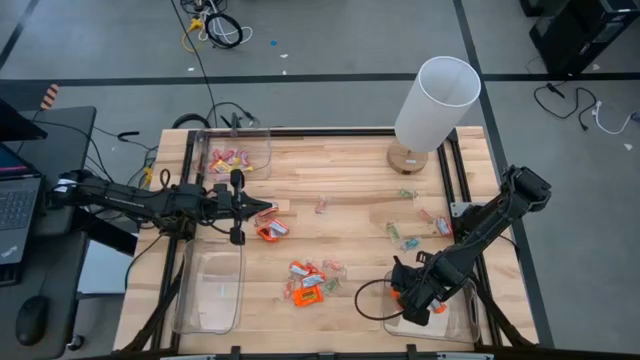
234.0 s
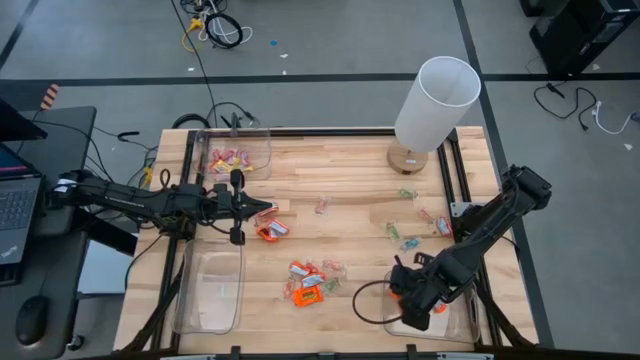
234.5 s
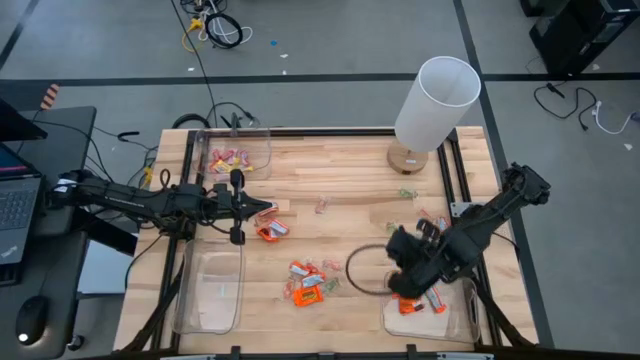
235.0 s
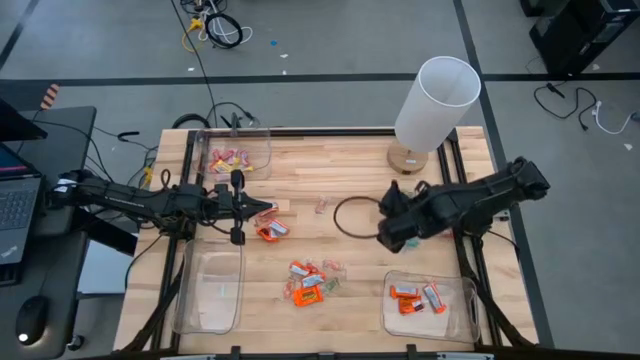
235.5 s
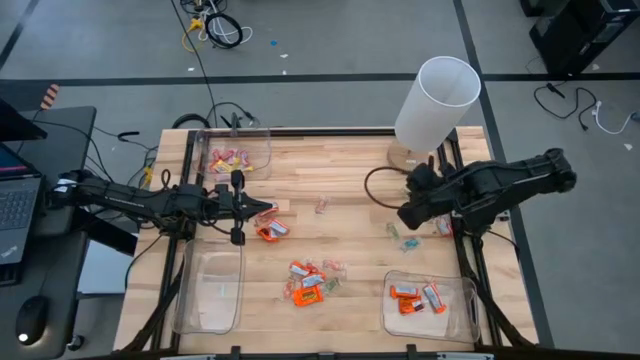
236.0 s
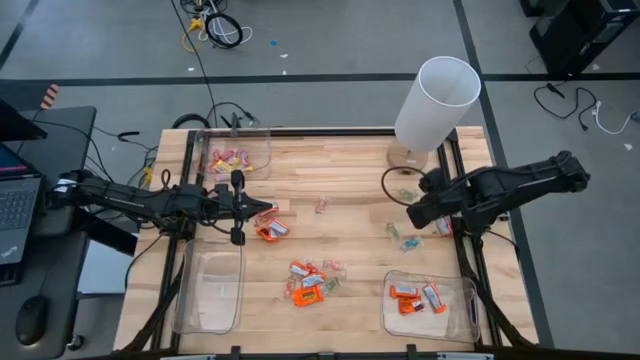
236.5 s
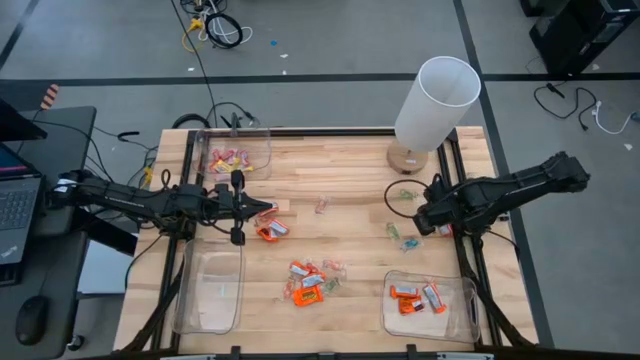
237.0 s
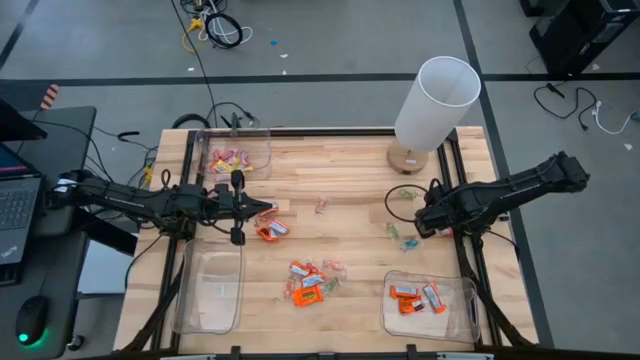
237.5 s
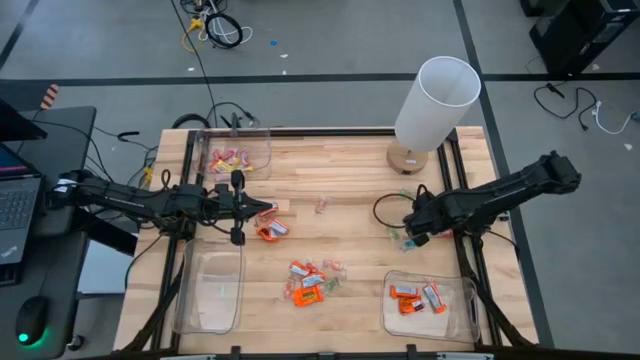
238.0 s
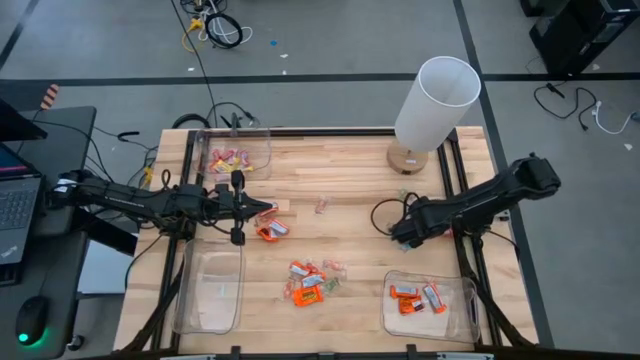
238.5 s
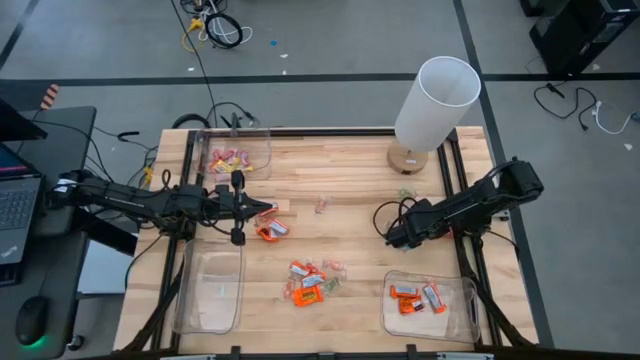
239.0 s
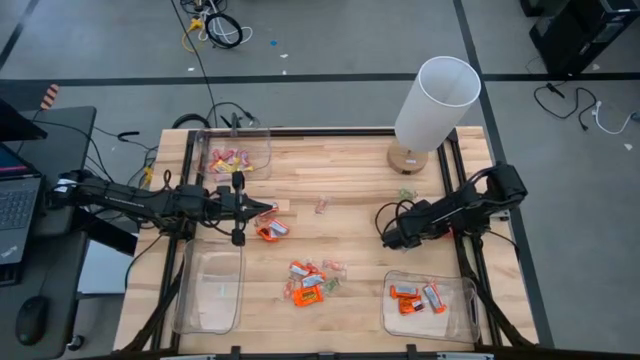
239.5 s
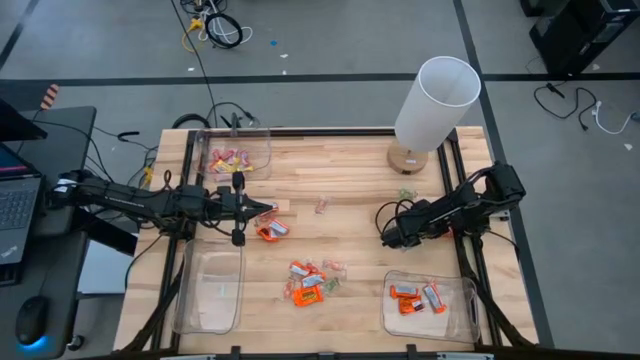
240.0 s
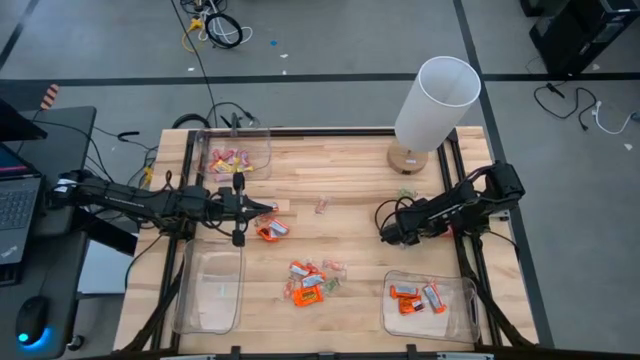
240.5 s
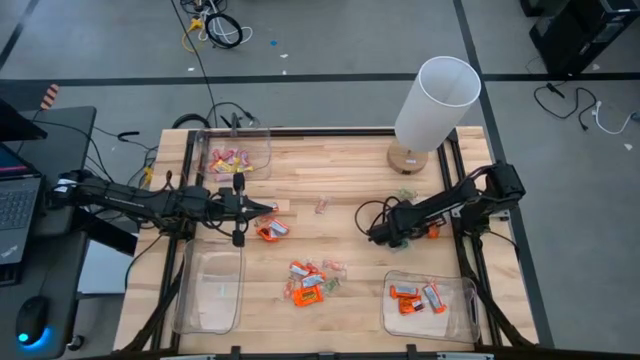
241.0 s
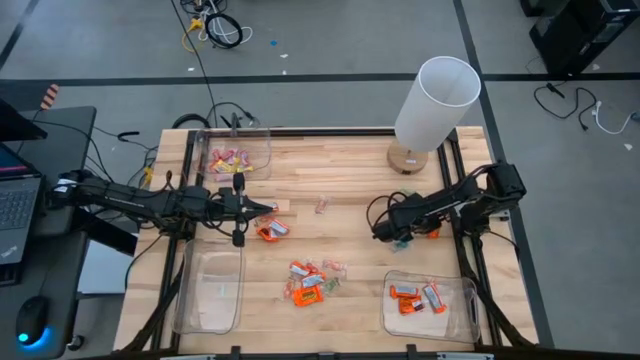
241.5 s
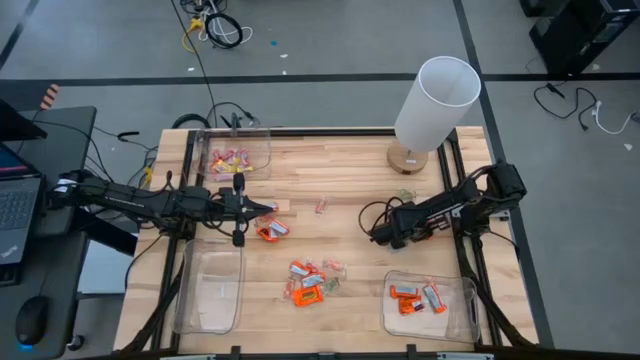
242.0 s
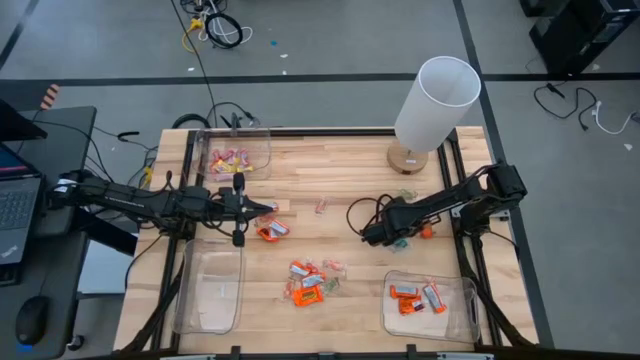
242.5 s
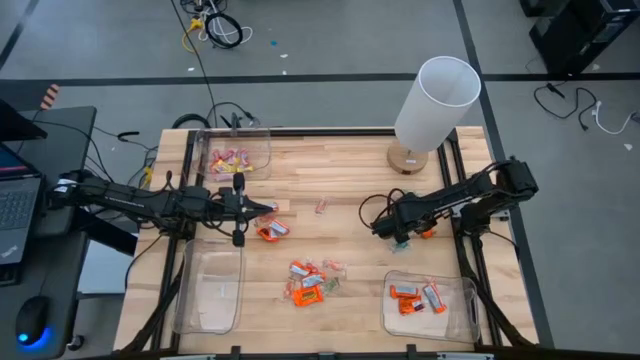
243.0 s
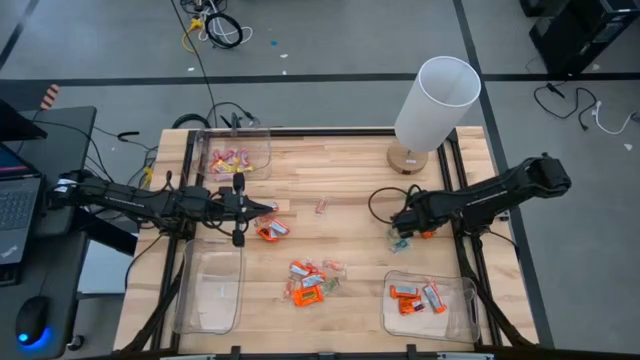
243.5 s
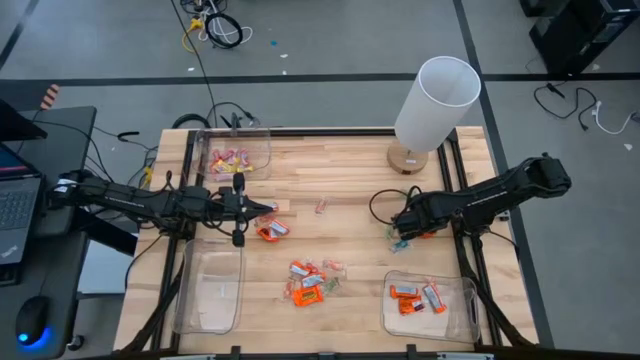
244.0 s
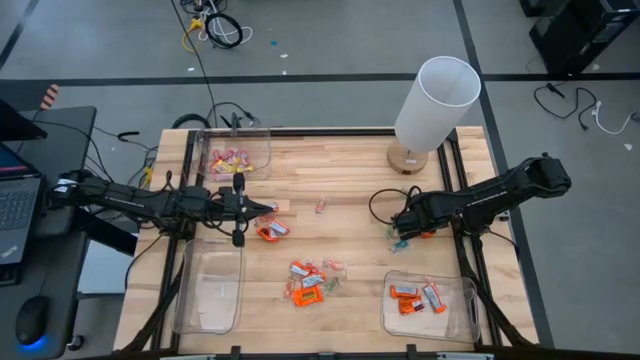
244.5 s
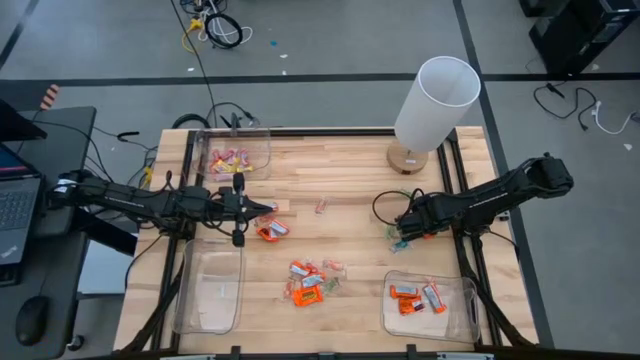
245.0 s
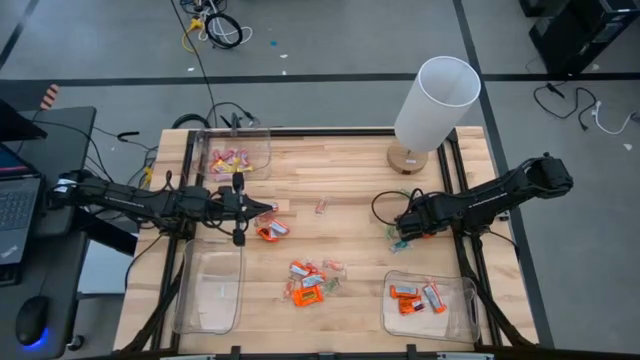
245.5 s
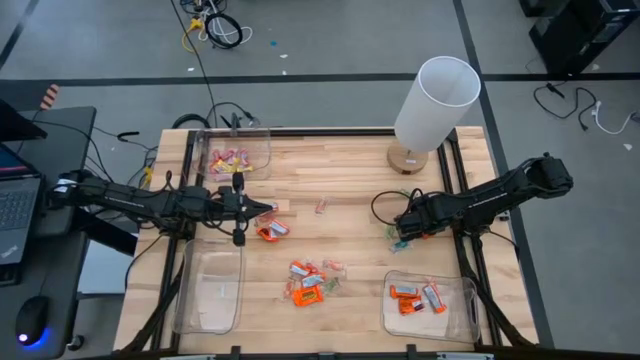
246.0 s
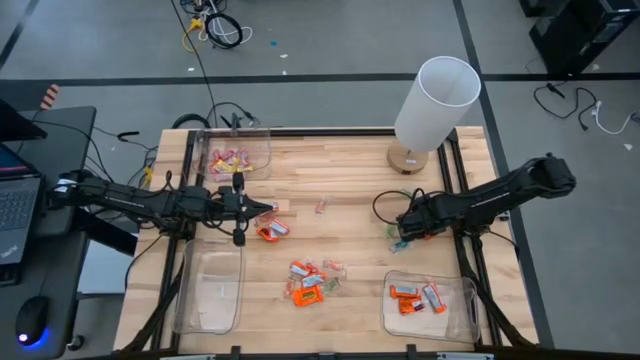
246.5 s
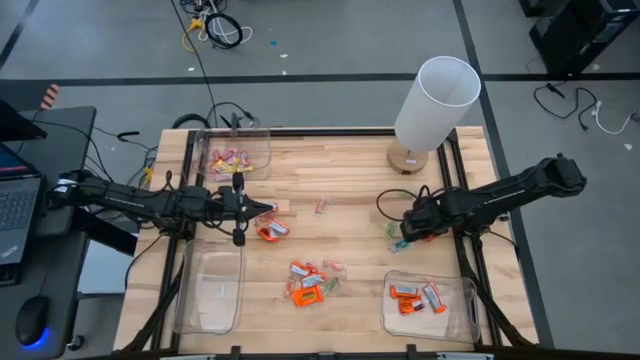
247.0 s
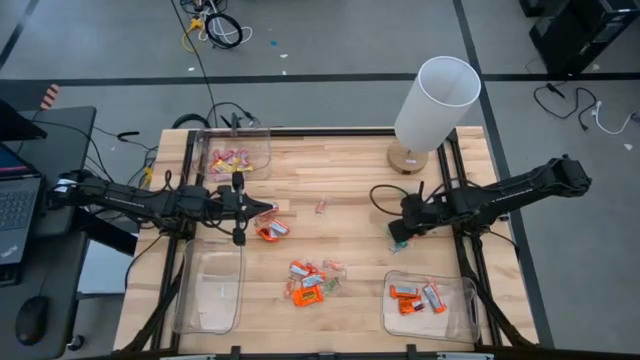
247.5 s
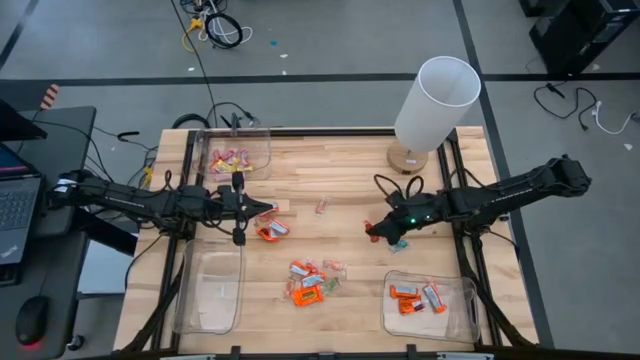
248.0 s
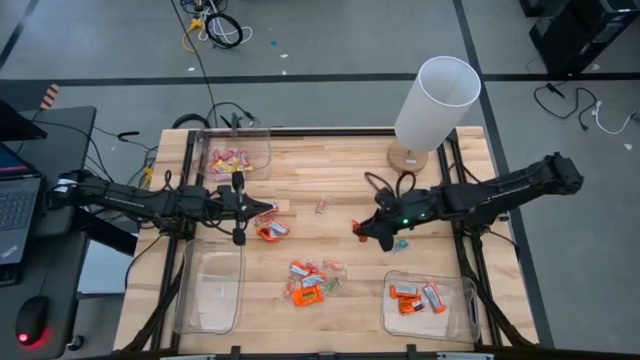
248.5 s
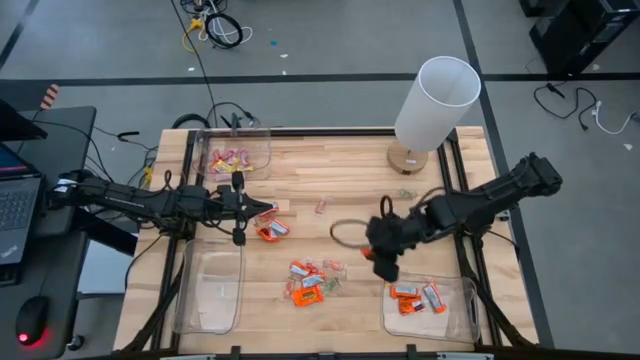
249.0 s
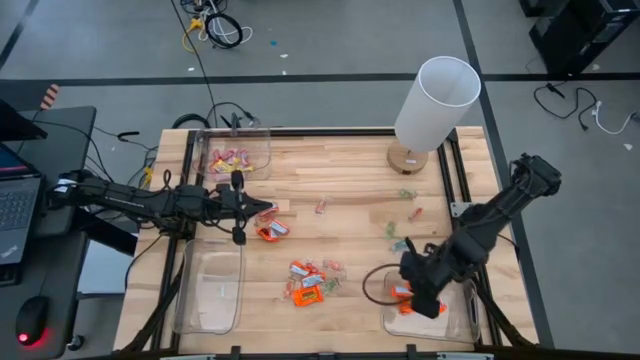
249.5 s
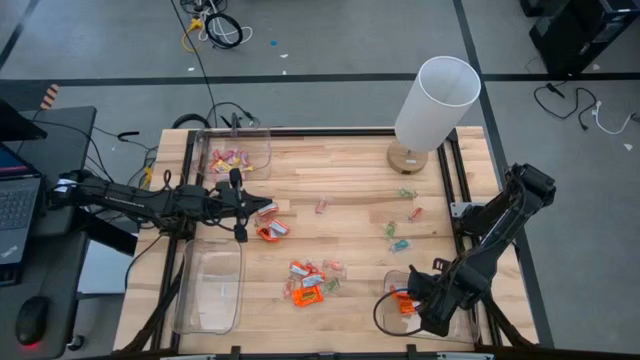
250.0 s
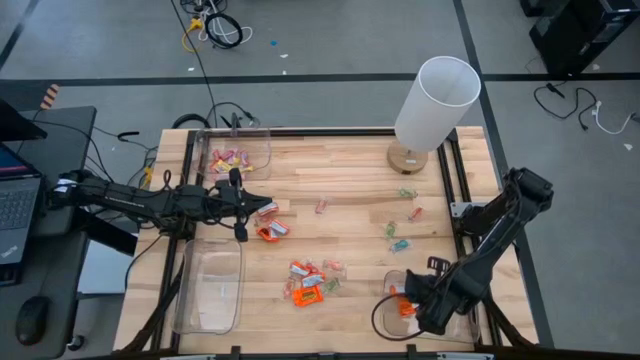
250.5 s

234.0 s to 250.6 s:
Task: Sort candy
Put the chocolate into the bottom right transparent bin

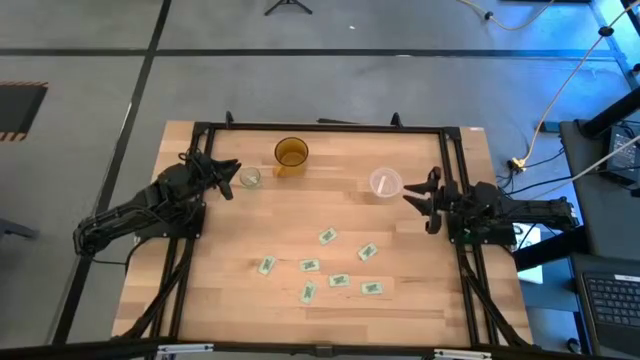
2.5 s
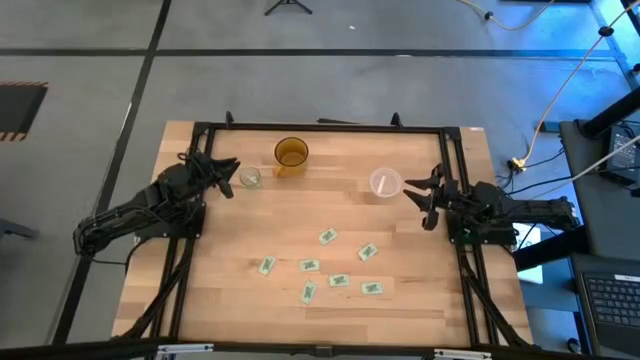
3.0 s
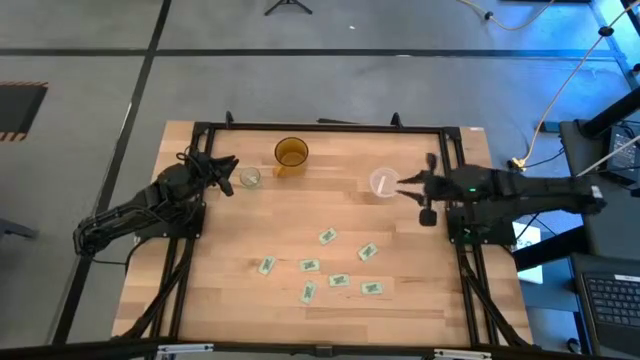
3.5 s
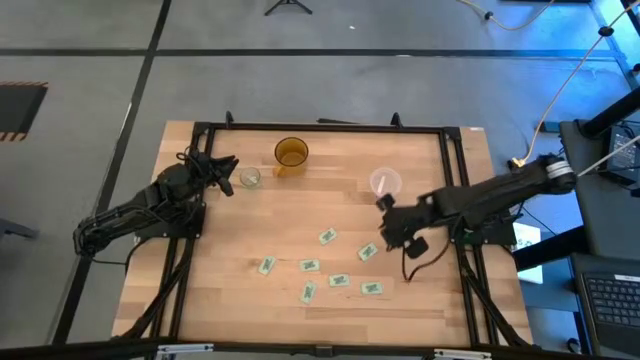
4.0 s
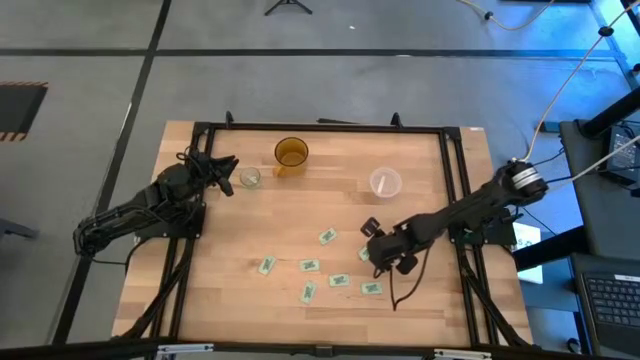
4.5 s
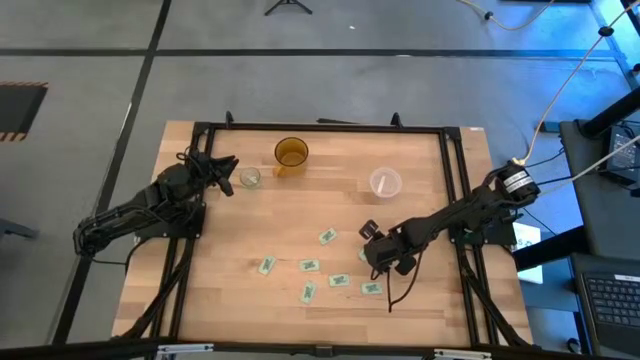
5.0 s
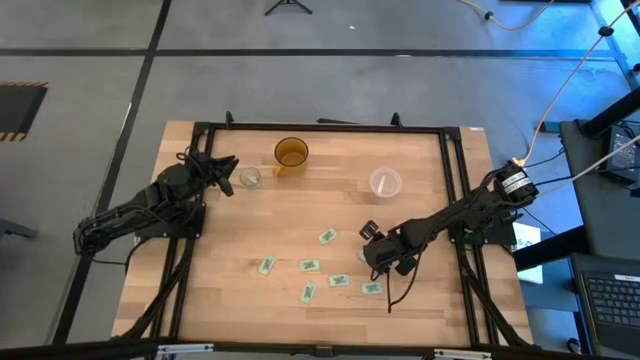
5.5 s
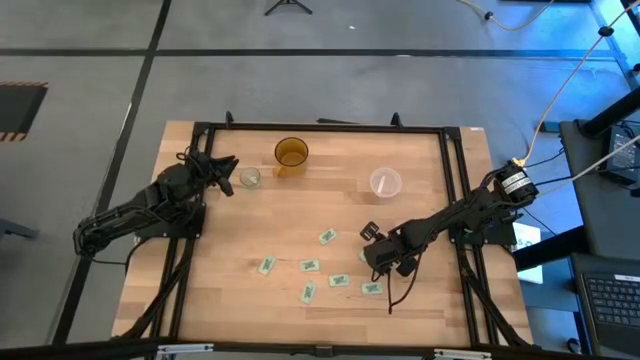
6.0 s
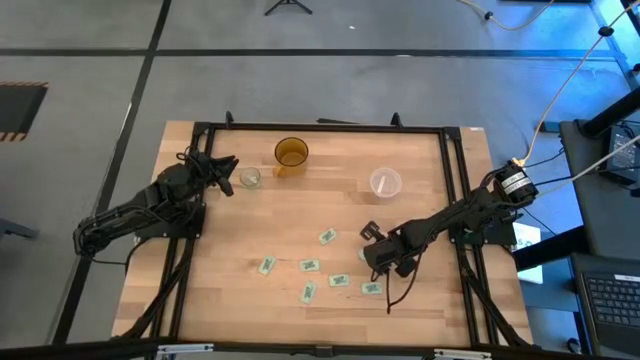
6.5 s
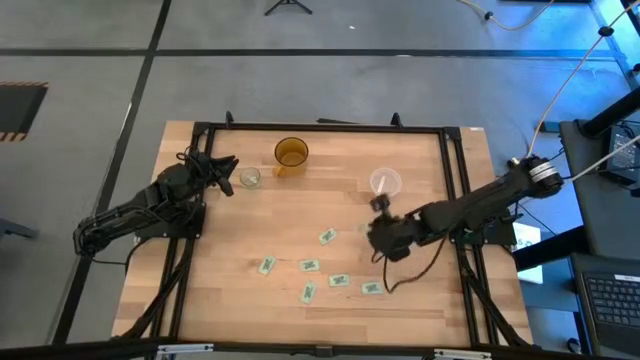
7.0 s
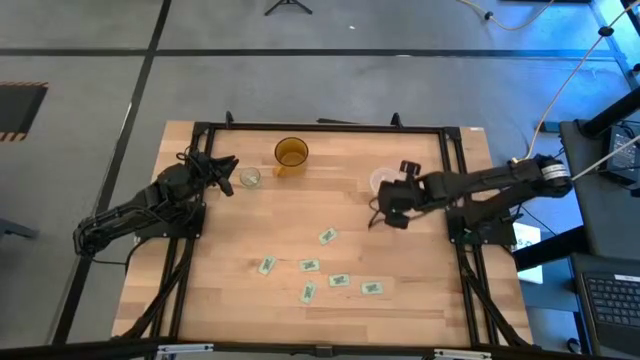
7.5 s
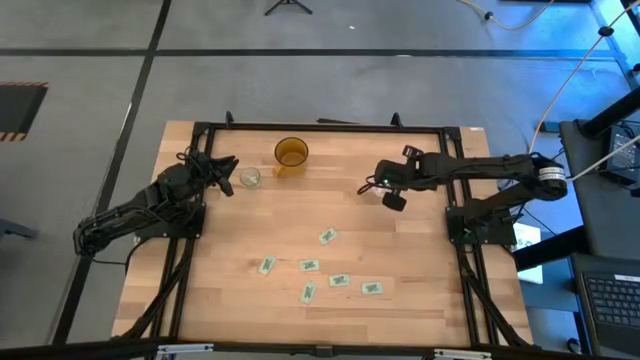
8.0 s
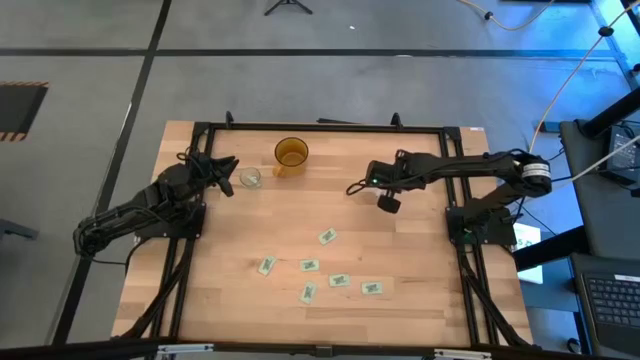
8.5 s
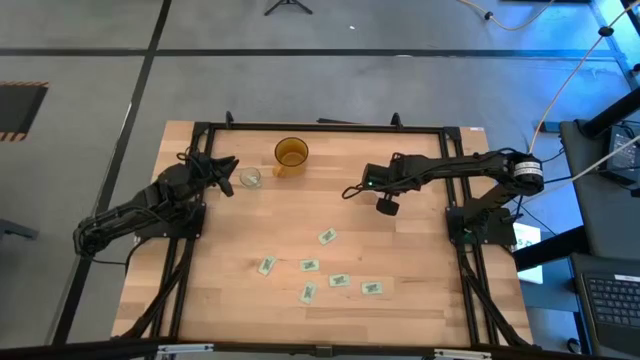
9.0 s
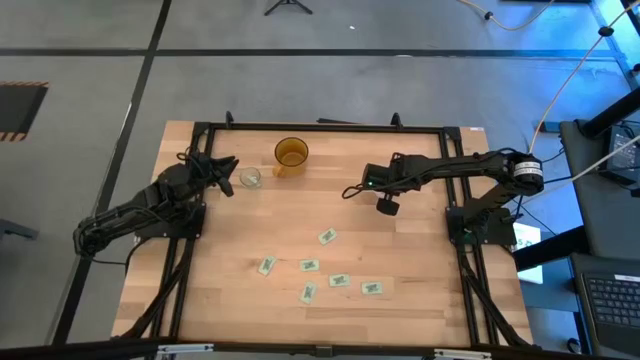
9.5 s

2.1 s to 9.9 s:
Task: Pick and place Stevia / Truvia into bins
Put the stevia packet into the transparent container
